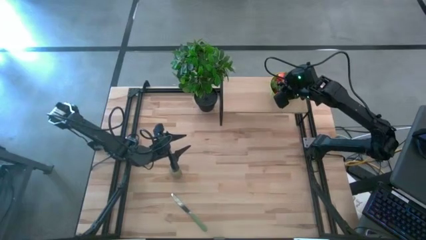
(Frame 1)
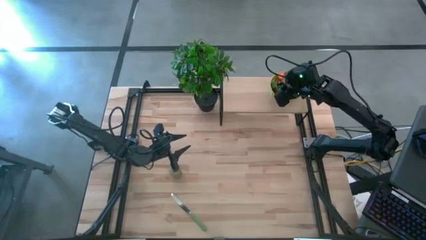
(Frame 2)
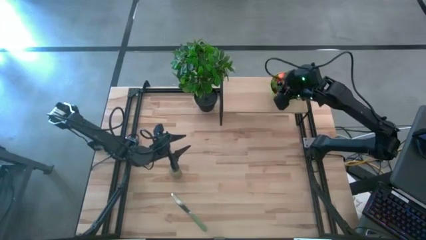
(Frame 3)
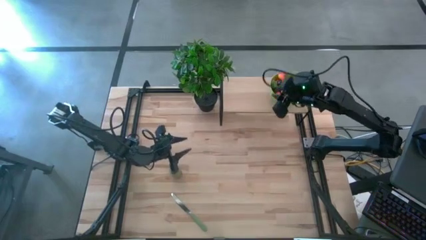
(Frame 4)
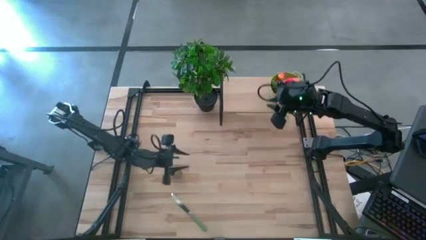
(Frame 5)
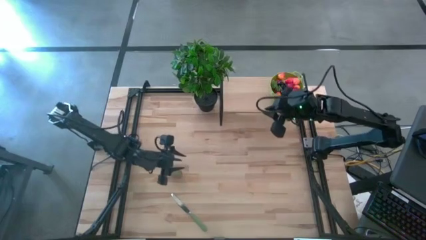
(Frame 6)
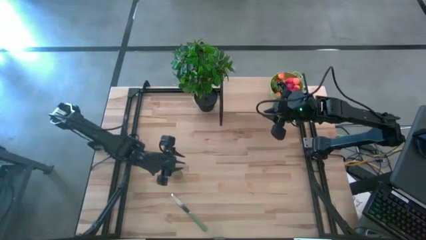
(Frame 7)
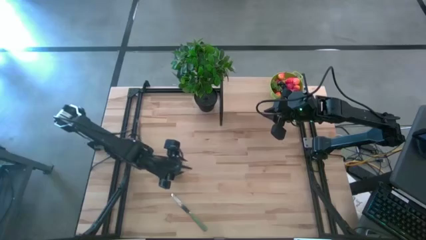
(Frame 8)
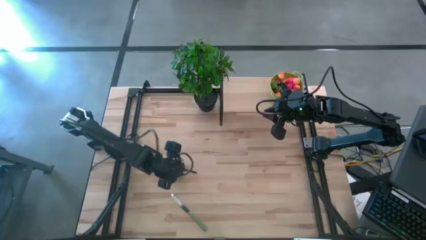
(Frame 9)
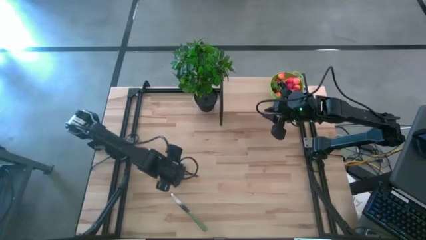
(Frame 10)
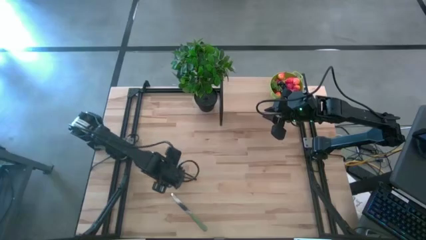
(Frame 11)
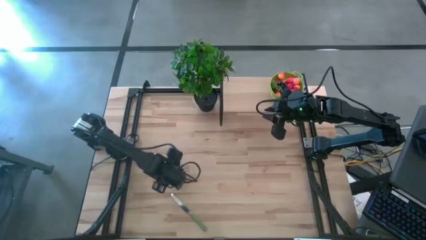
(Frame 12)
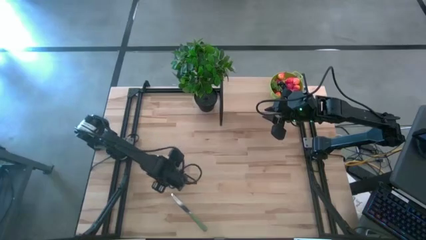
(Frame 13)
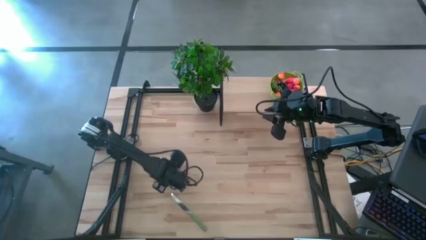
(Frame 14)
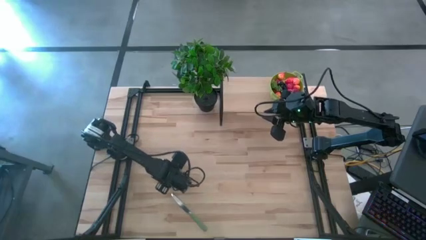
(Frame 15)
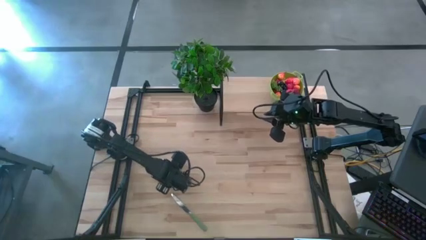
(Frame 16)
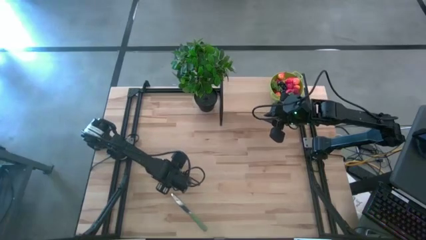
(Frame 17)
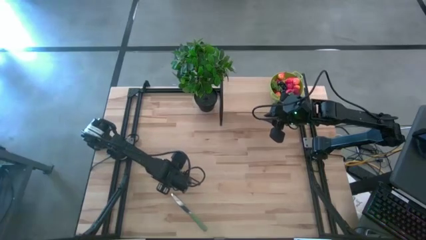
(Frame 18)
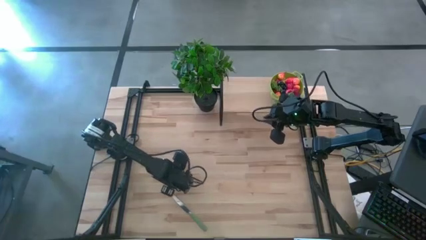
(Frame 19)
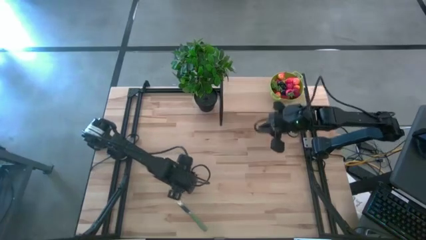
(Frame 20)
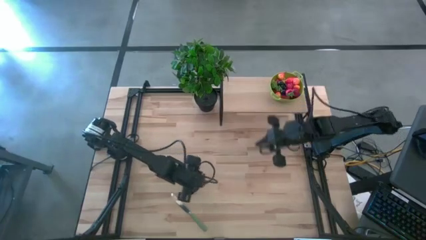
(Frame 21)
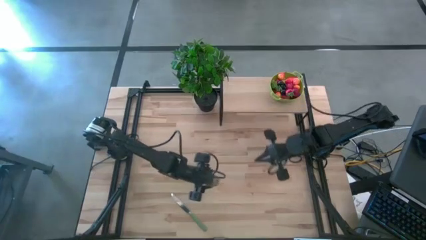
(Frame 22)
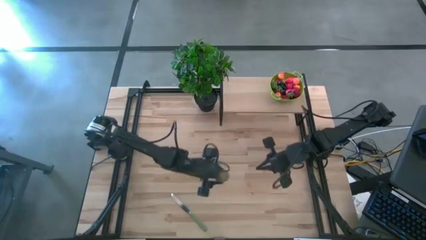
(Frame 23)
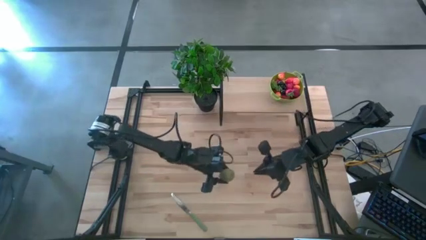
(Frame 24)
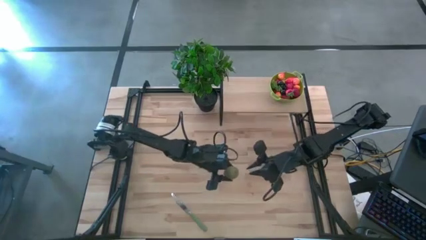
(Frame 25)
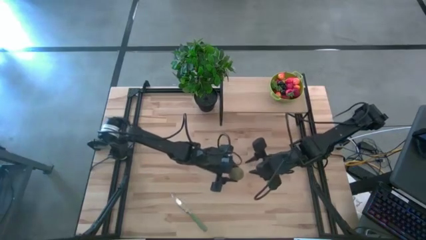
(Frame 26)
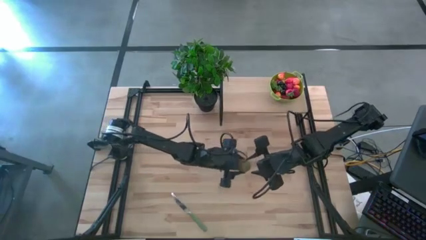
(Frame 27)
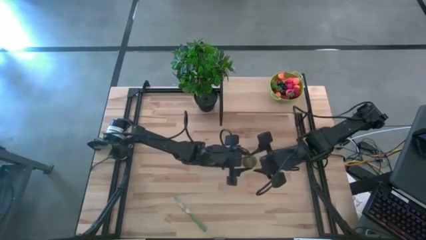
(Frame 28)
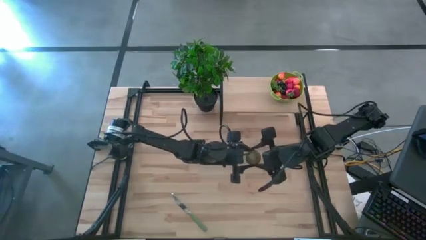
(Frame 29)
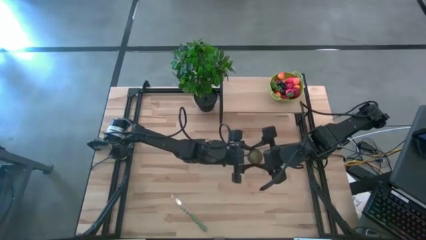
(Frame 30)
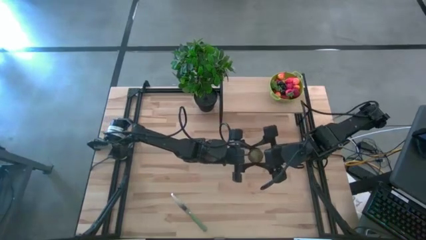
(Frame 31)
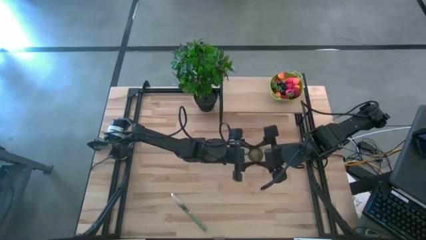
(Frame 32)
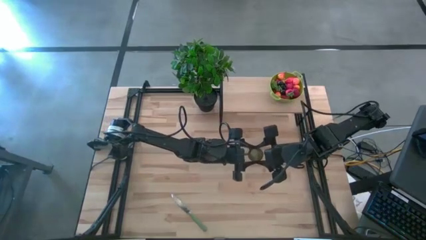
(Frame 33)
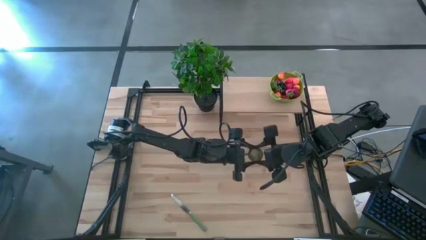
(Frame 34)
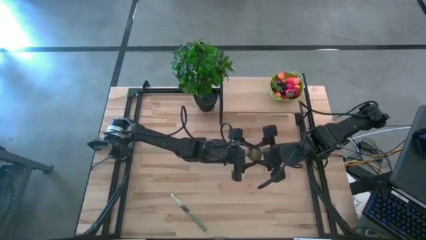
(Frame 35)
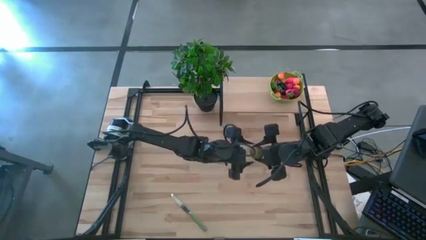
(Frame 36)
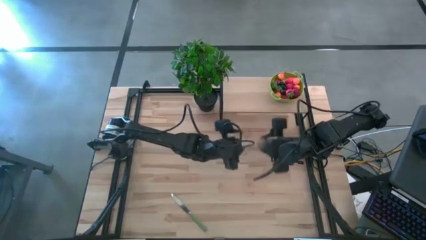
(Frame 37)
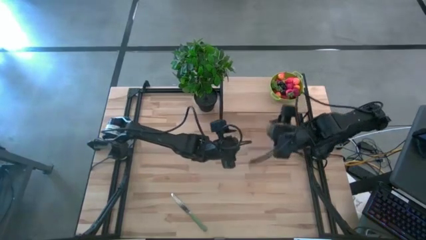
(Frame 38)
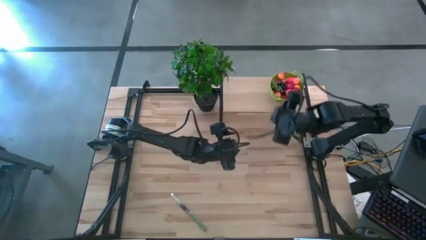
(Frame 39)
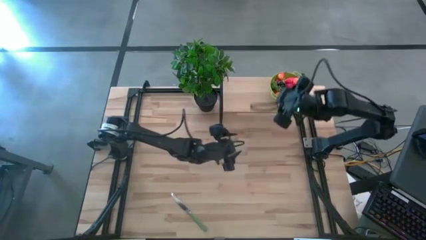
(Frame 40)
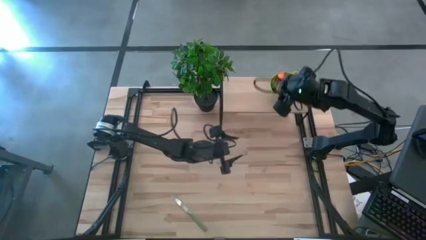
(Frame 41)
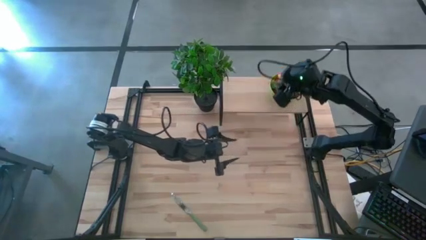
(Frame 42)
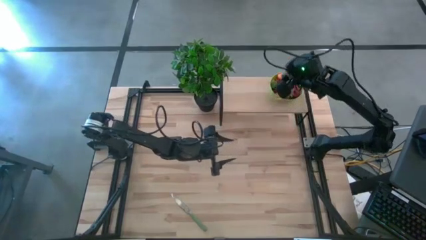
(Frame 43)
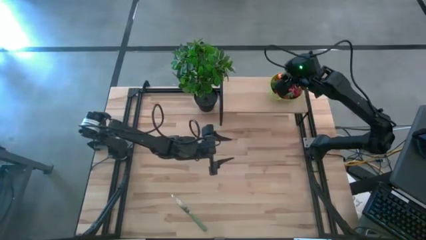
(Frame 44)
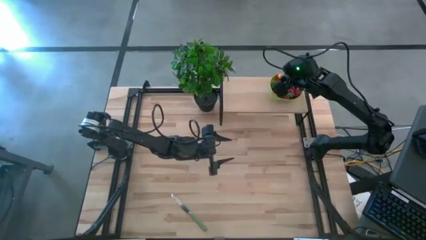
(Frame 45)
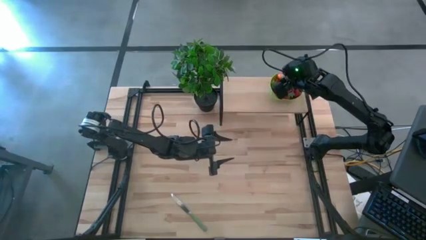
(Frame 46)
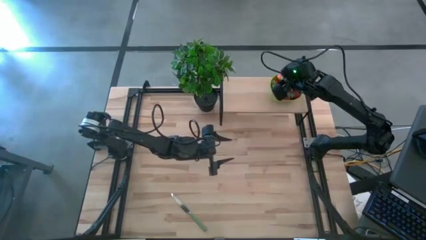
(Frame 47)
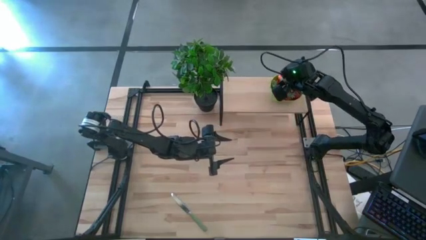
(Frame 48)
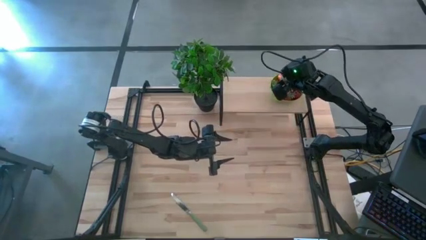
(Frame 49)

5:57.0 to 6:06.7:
Task: Pick & Place Fruit
Put the kiwi into the green strainer bowl on the shelf
